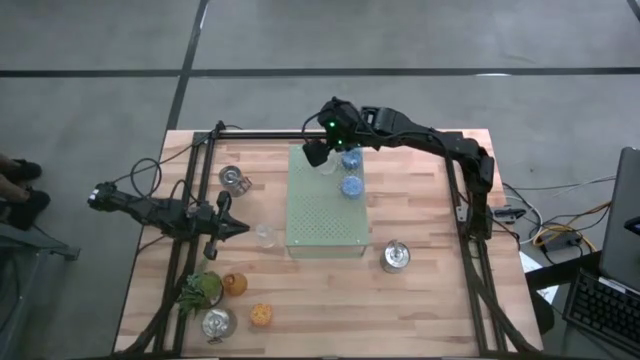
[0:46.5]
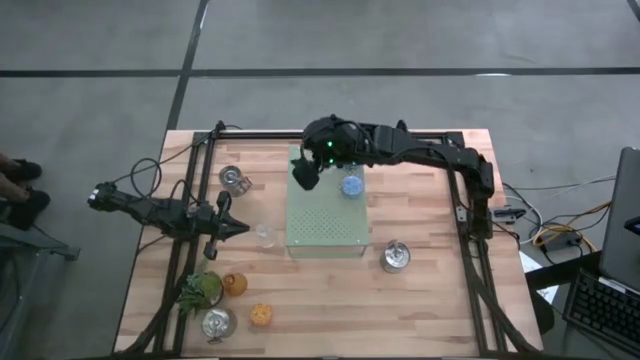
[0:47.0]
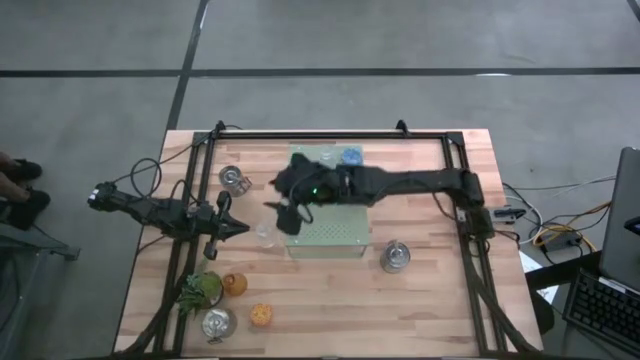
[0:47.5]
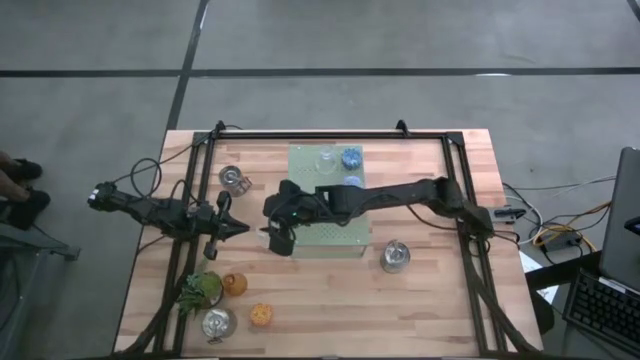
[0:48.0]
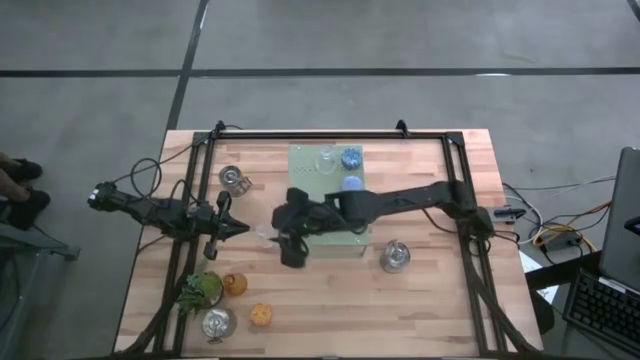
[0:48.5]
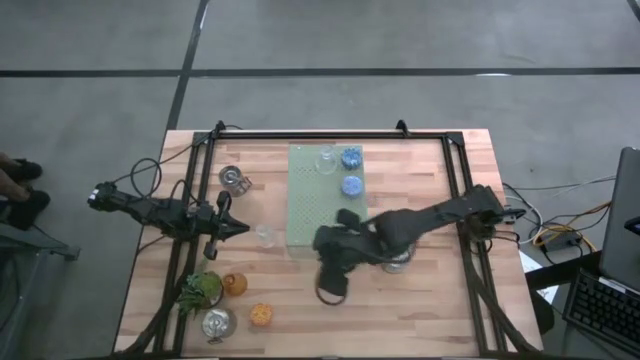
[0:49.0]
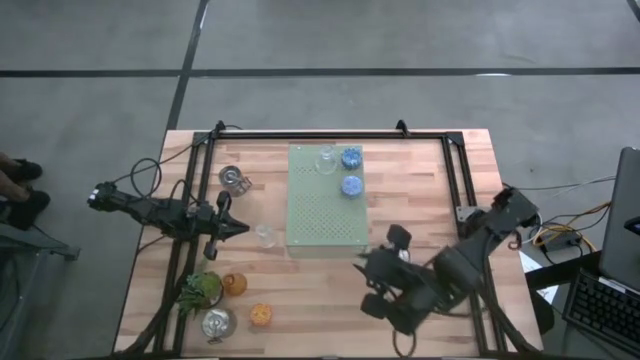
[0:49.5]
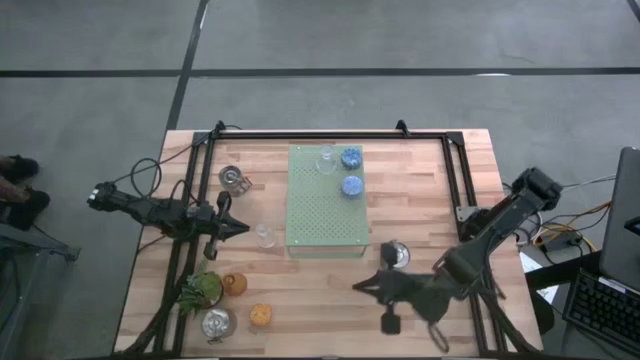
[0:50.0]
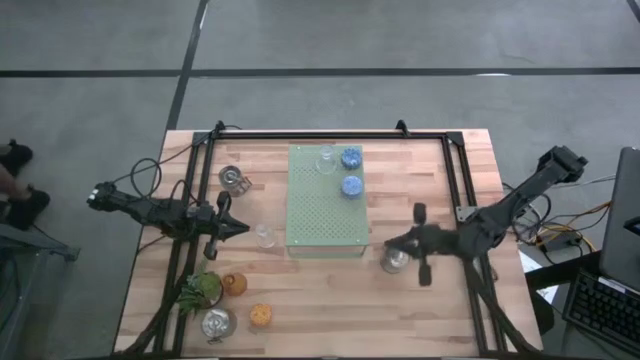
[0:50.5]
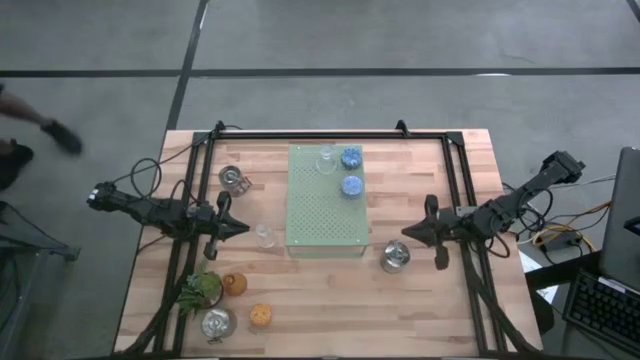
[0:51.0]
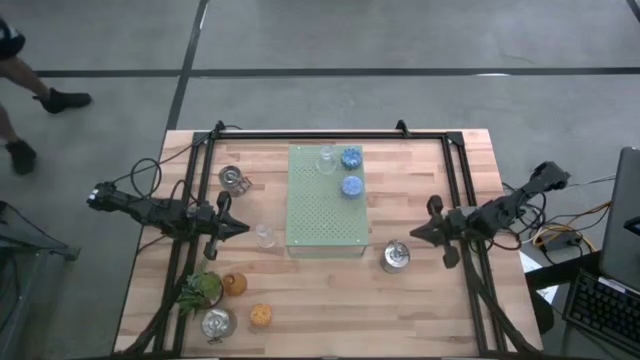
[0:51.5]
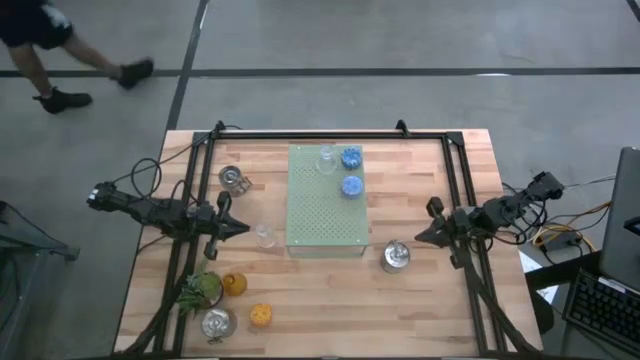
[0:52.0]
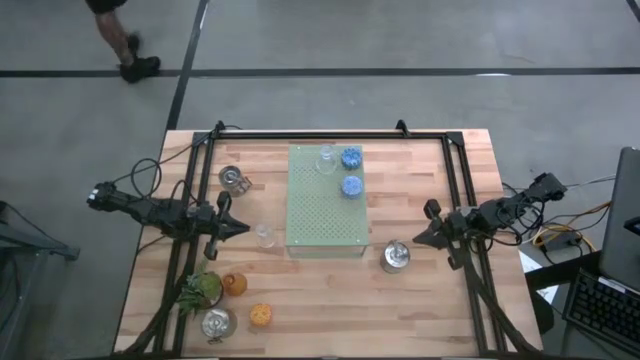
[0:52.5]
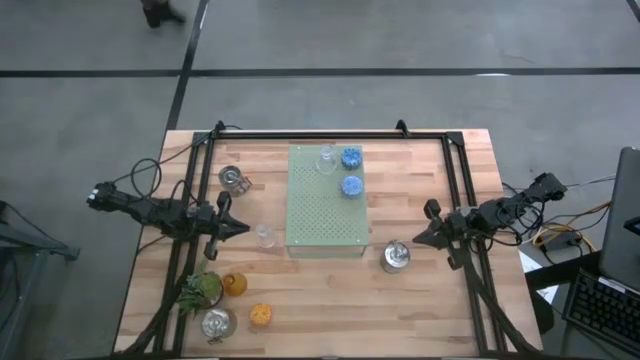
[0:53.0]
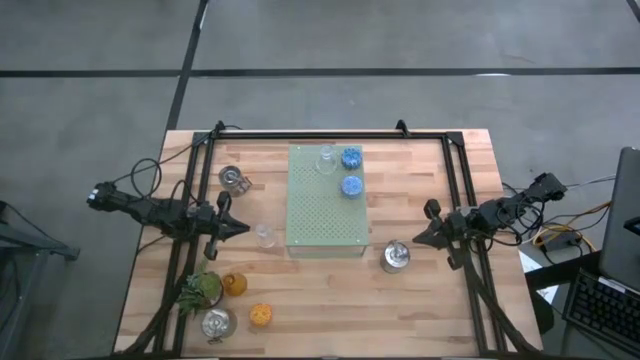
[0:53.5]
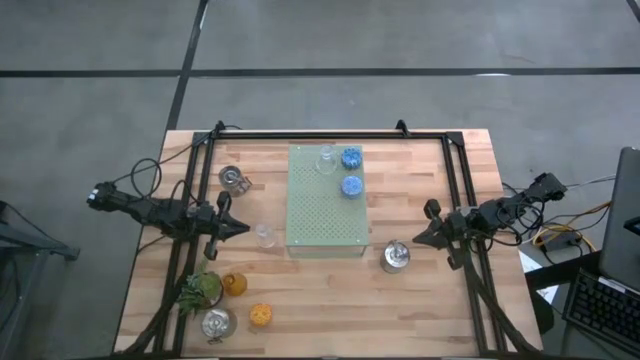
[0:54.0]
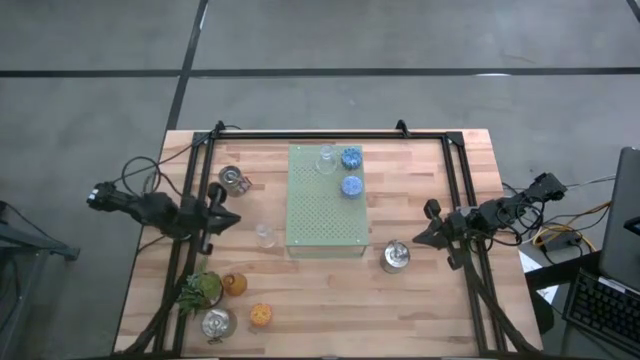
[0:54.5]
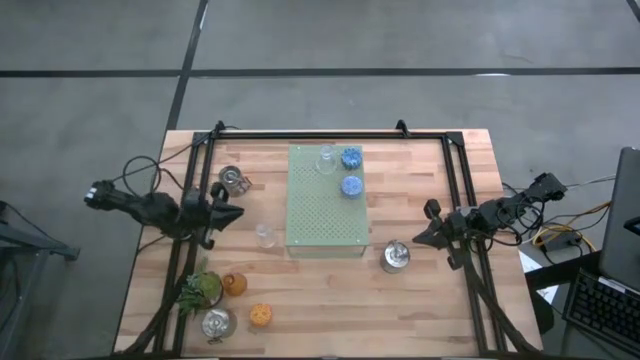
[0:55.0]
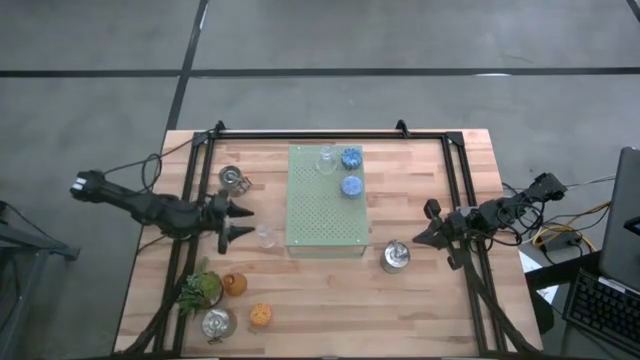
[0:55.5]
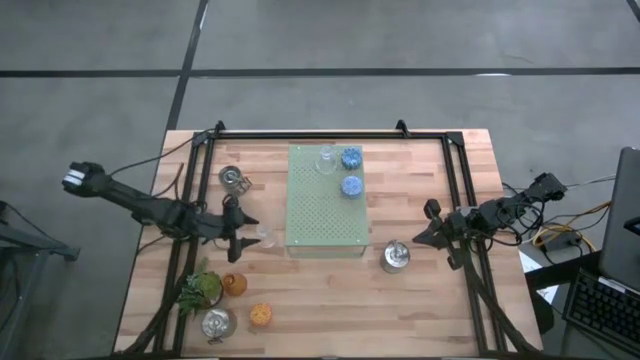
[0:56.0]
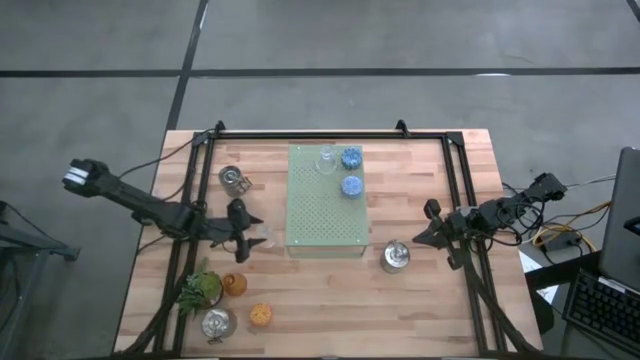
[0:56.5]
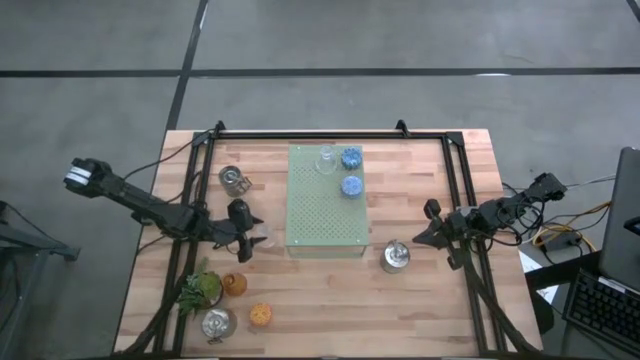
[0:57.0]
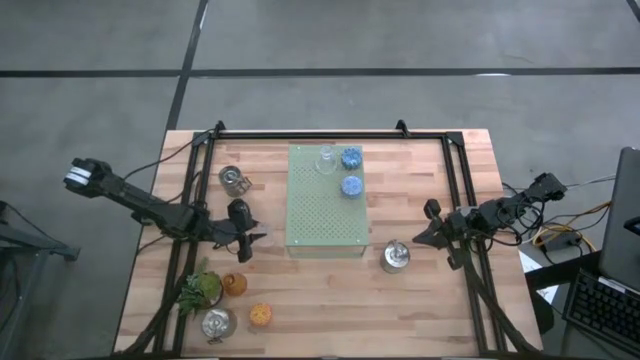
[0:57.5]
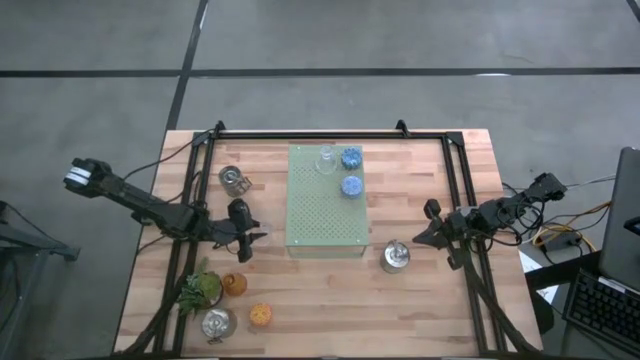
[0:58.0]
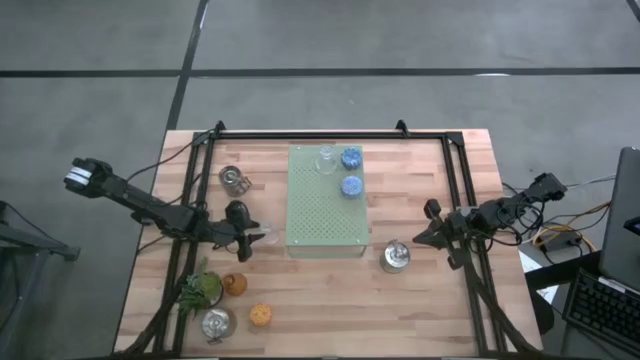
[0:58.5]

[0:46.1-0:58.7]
Task: Pick & Place candle stick holders
Put the transparent candle holder on the shelf aligned with the other transparent candle holder

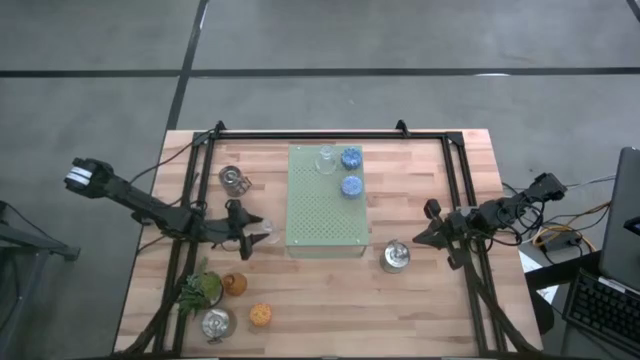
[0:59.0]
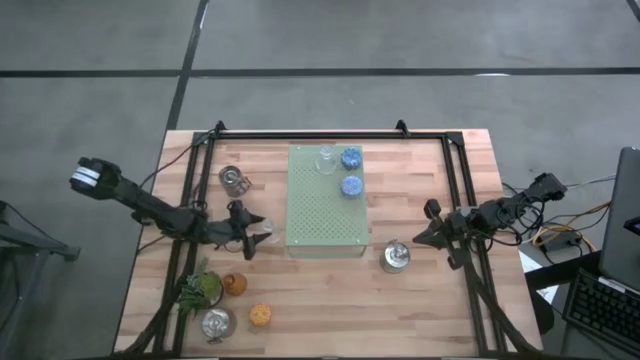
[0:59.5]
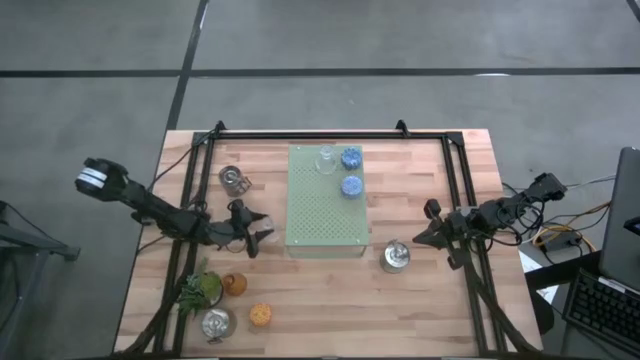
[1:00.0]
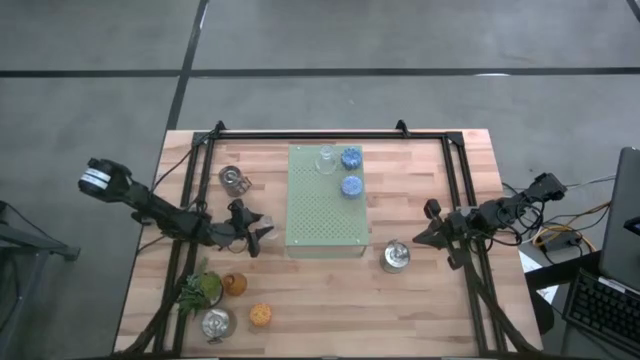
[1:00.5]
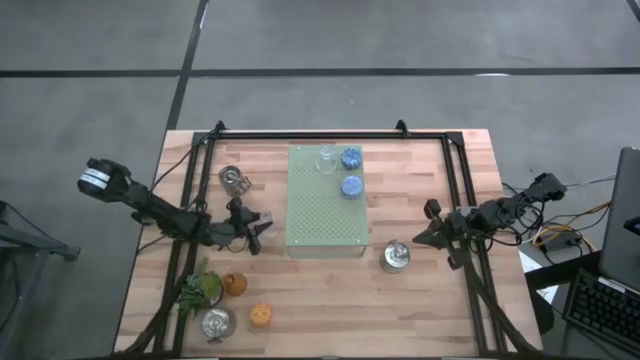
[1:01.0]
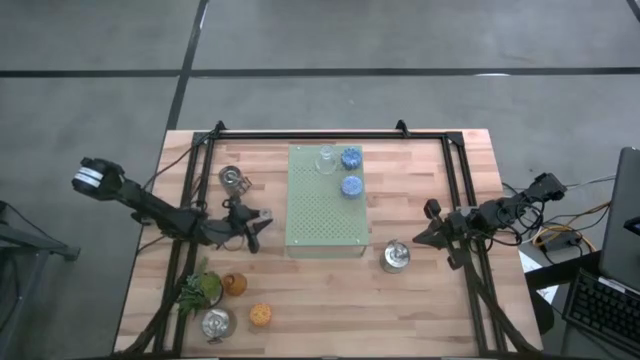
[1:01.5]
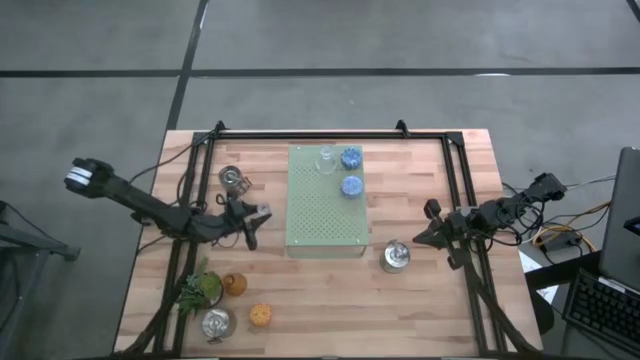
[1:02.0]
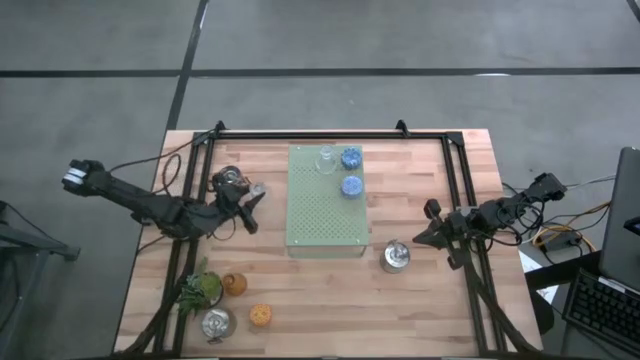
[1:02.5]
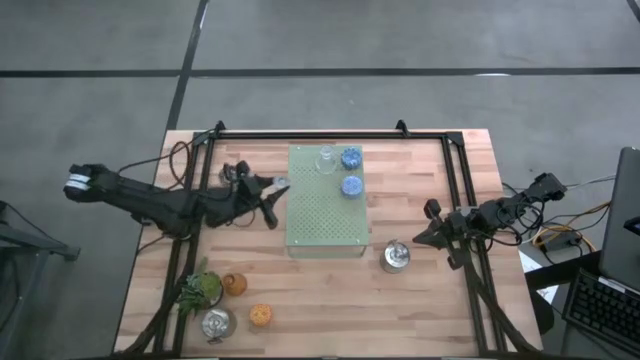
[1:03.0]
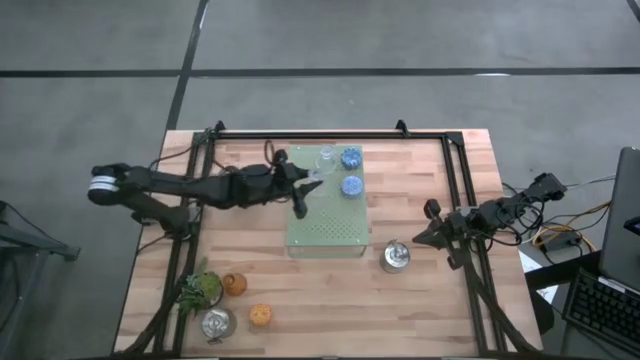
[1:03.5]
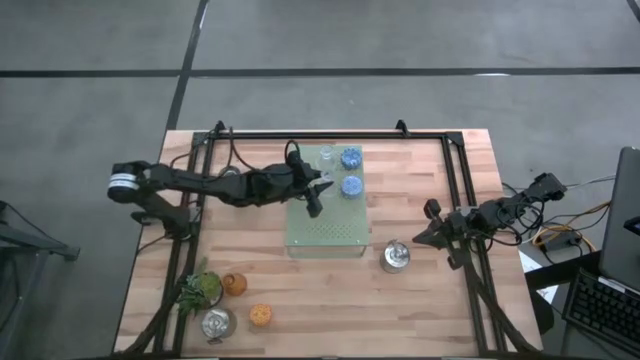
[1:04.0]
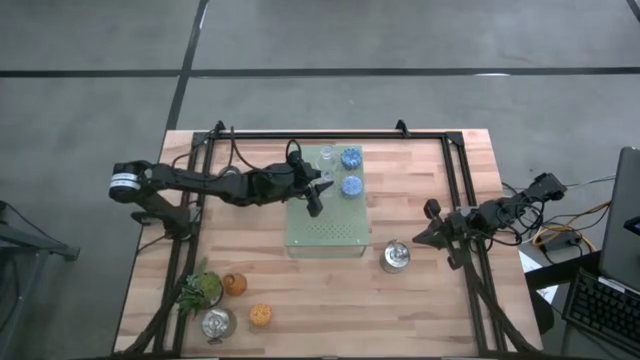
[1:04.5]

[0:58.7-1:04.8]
Put the transparent candle holder on the shelf aligned with the other transparent candle holder

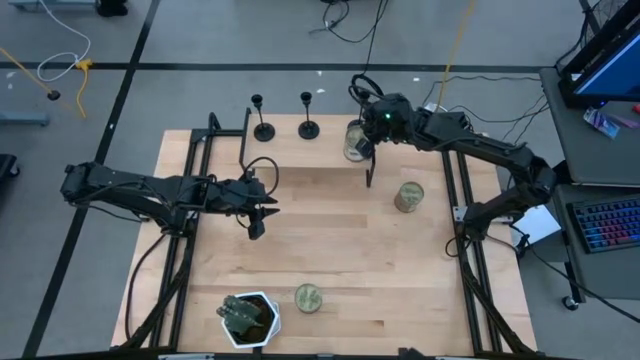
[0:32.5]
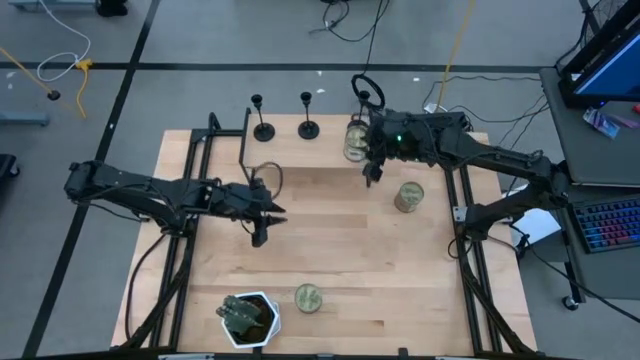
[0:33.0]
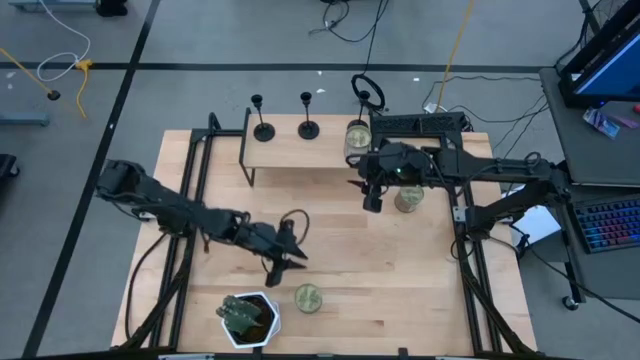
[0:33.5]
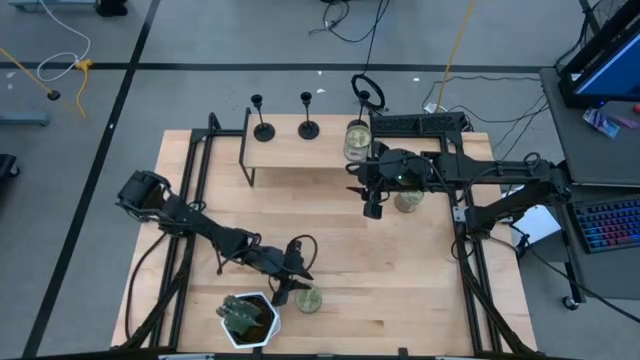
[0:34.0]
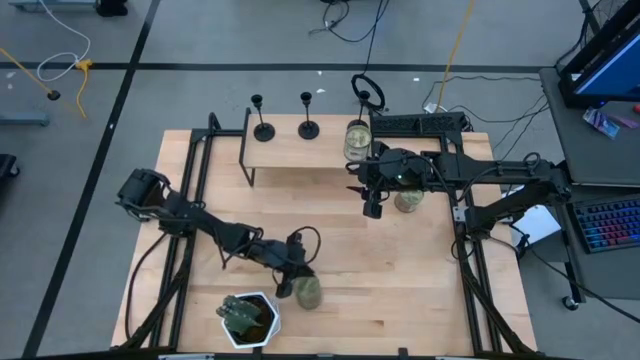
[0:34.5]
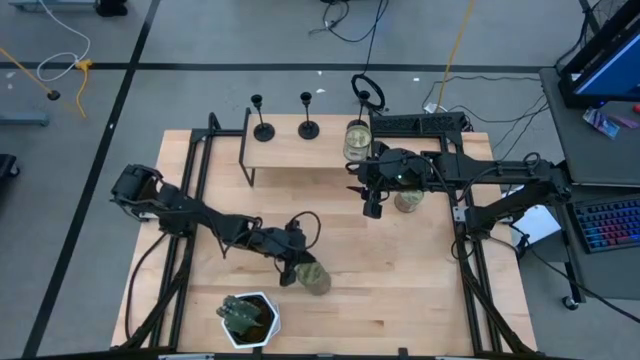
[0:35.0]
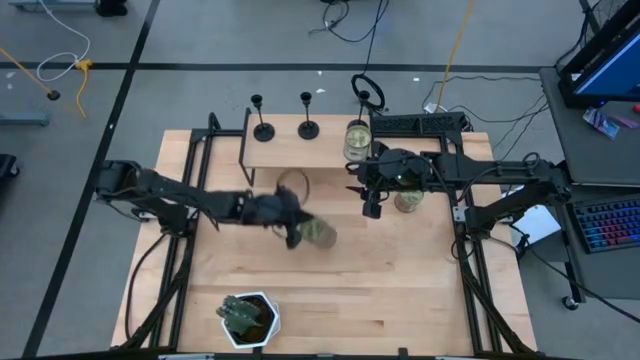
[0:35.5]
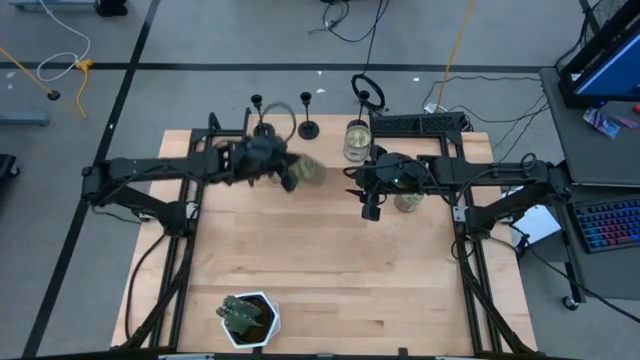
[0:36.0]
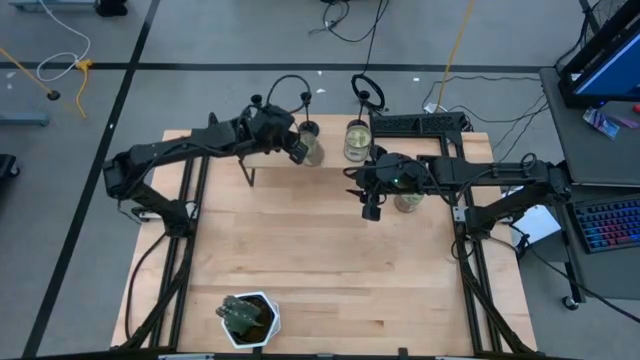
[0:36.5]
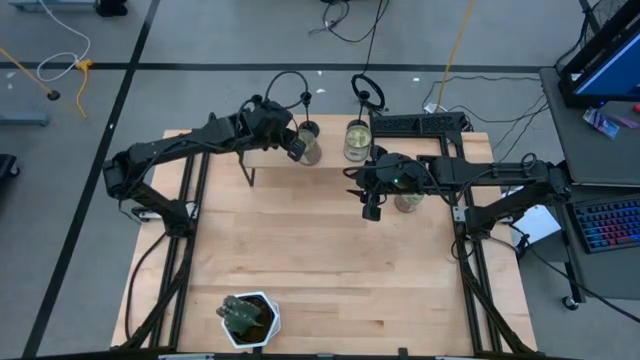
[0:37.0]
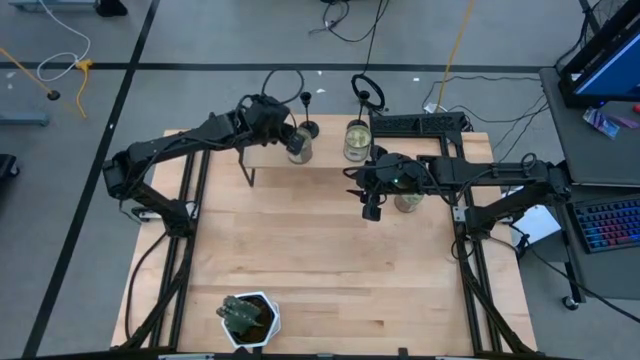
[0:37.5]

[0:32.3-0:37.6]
Task: Pick & Place candle stick holders
Put the bottom scented candle on the shelf
